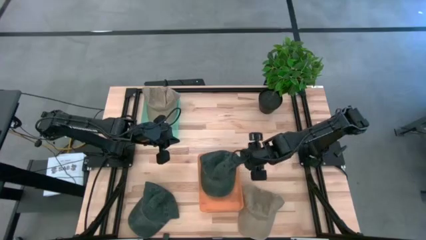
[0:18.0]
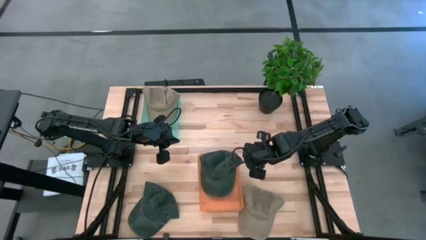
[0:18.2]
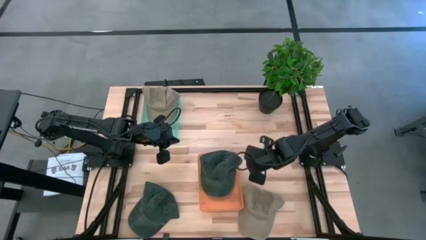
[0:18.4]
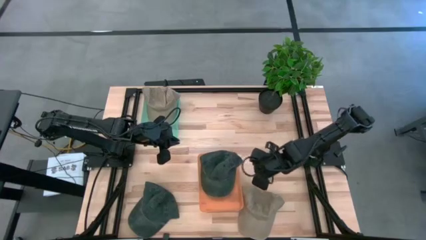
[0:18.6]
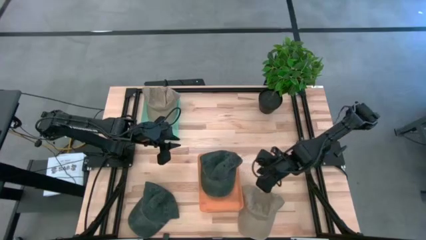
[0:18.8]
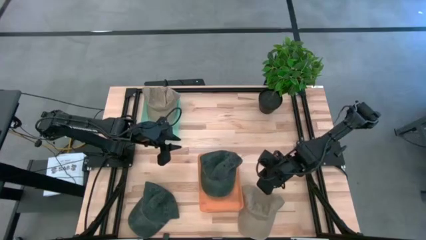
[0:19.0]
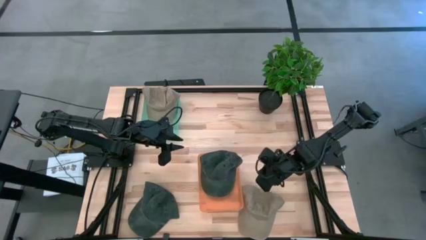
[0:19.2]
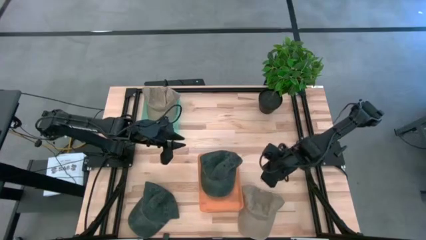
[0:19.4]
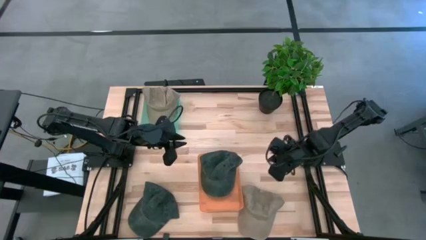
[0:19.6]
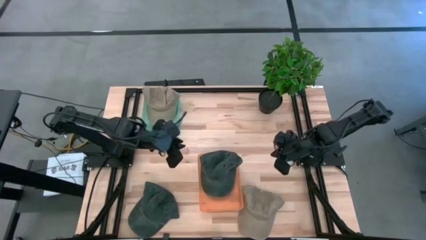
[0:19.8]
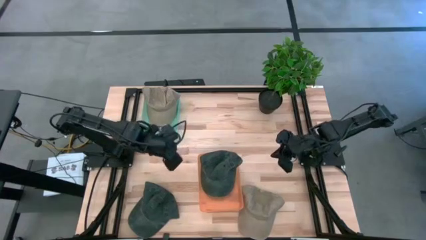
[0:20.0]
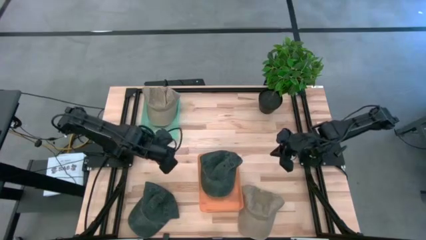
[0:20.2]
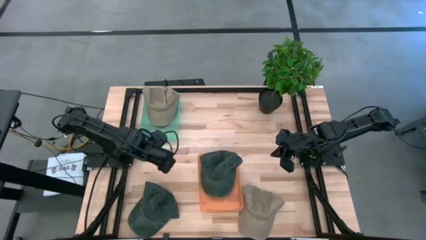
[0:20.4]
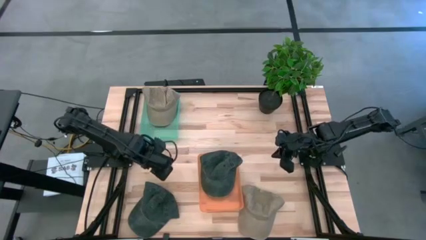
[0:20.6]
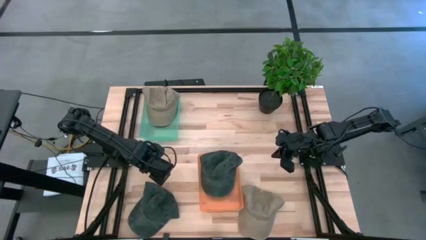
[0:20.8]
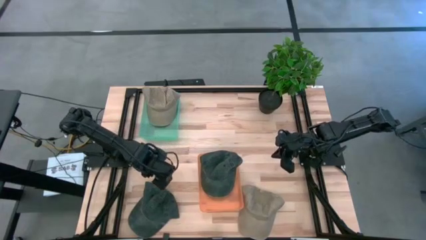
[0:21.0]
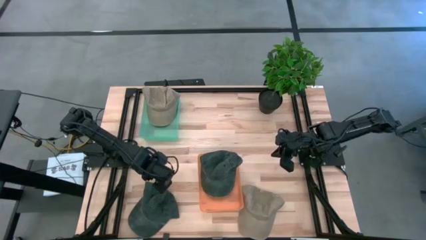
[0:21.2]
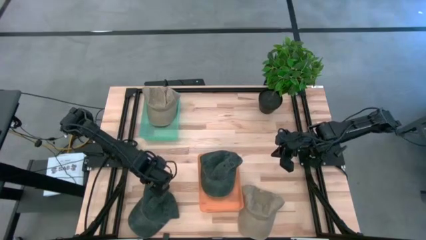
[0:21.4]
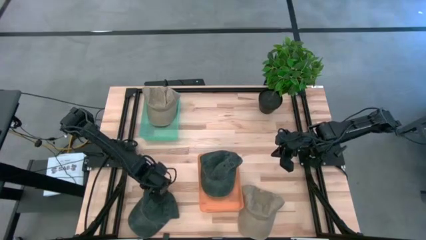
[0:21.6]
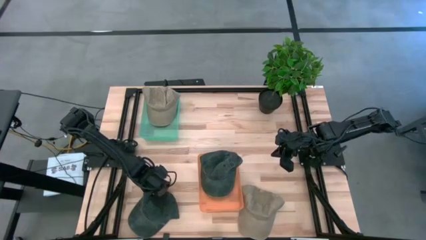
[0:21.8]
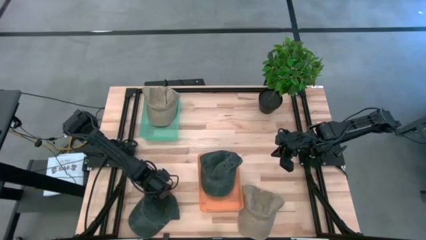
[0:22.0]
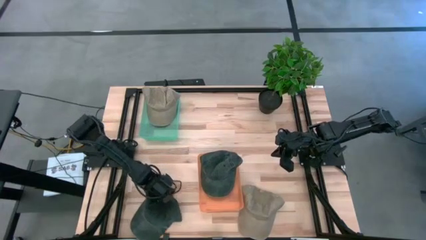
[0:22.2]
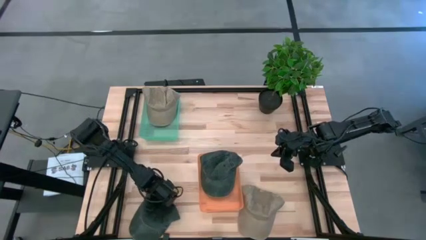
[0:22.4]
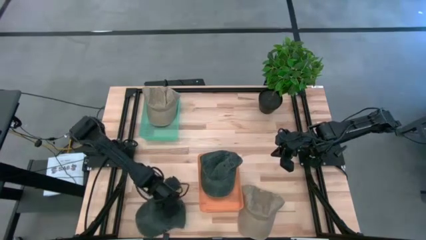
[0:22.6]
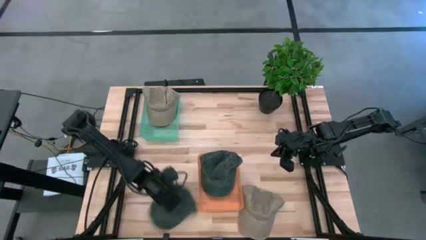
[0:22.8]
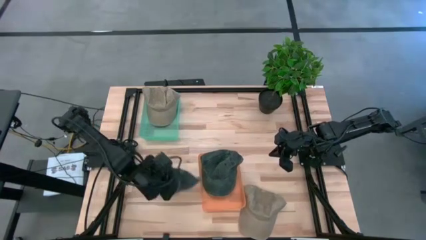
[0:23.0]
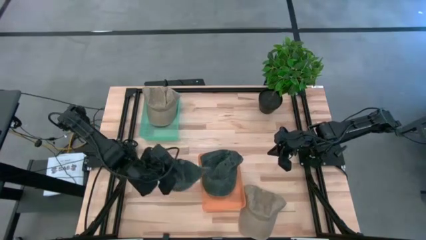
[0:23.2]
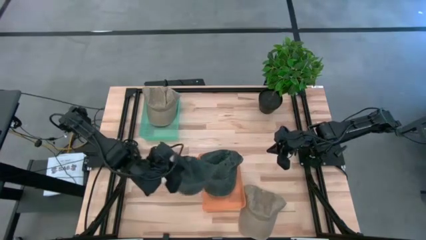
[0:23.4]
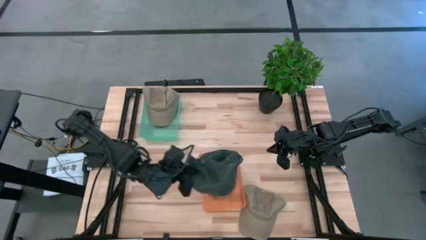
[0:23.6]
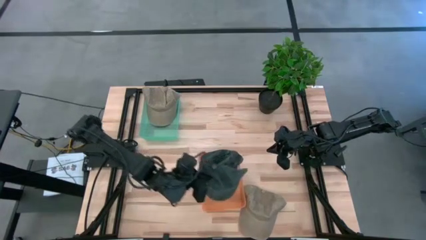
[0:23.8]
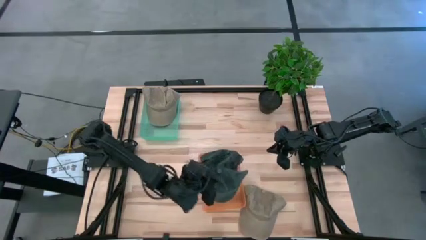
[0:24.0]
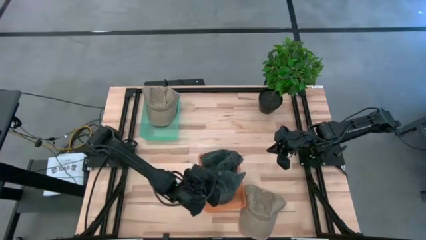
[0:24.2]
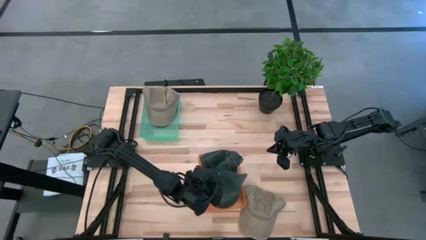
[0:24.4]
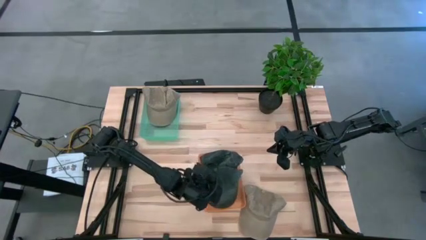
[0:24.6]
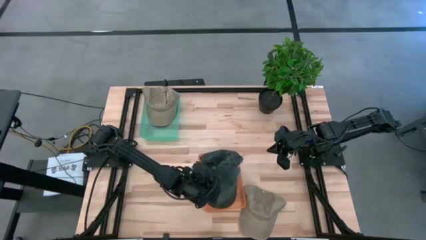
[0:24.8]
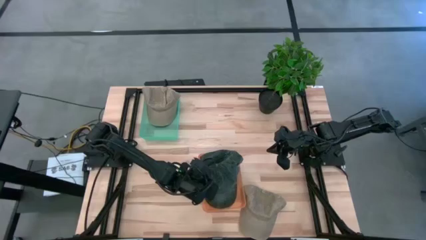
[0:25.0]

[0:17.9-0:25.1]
Task: Pick & Place hat
Put the green cap into the orange bin

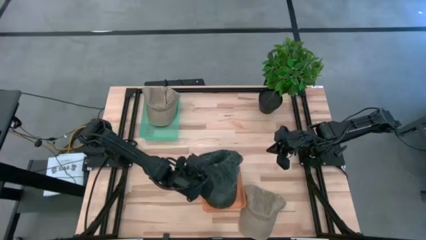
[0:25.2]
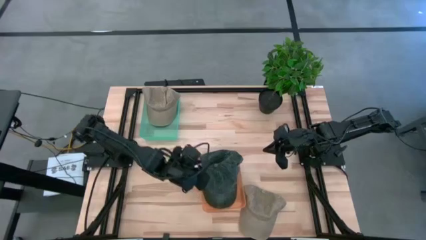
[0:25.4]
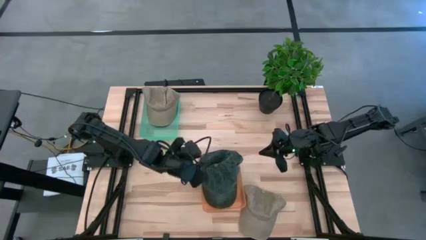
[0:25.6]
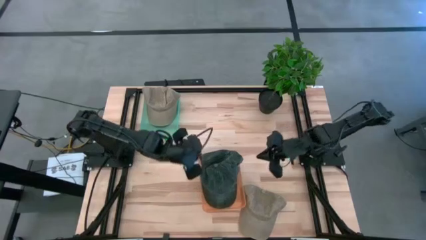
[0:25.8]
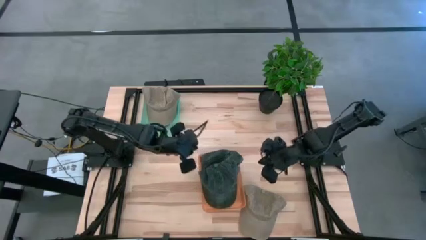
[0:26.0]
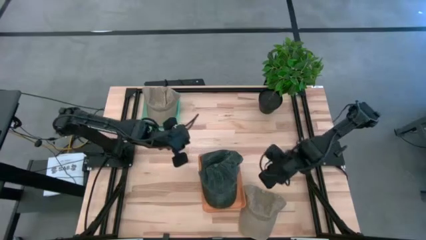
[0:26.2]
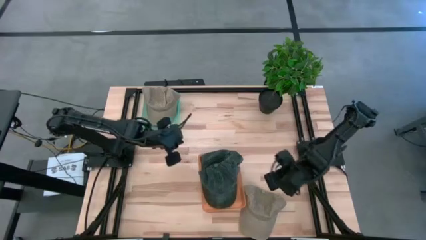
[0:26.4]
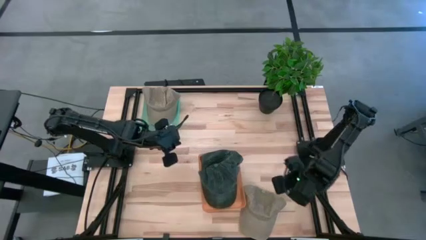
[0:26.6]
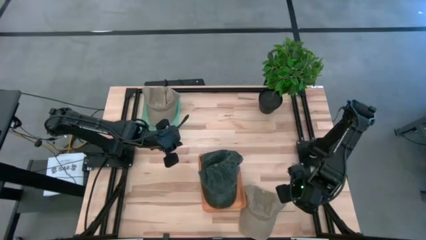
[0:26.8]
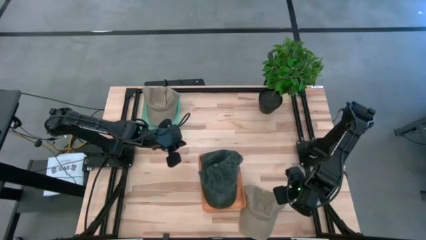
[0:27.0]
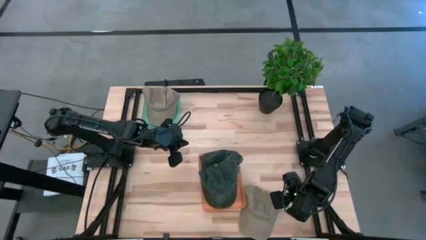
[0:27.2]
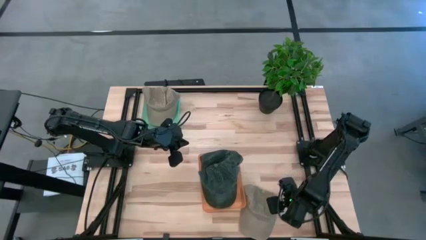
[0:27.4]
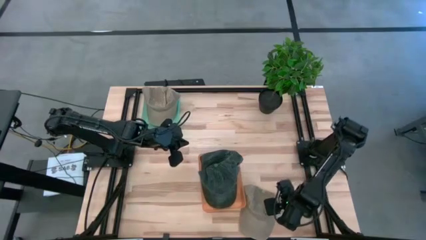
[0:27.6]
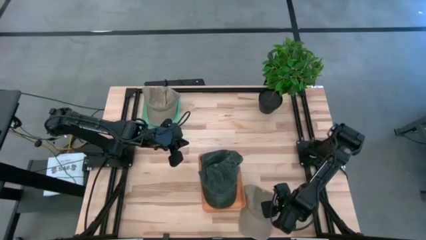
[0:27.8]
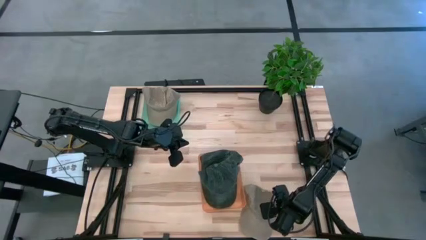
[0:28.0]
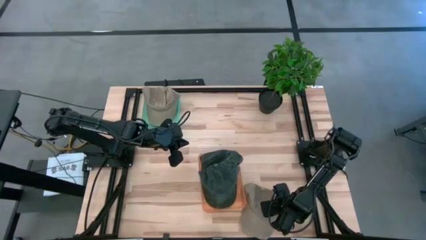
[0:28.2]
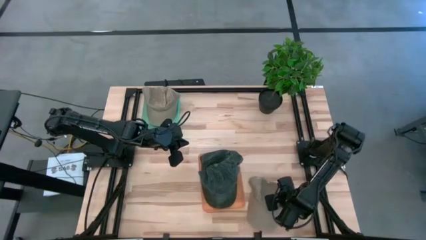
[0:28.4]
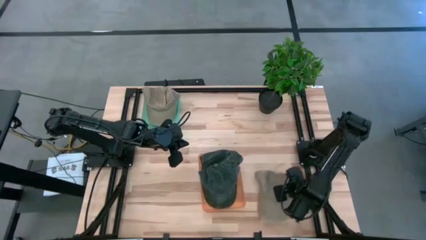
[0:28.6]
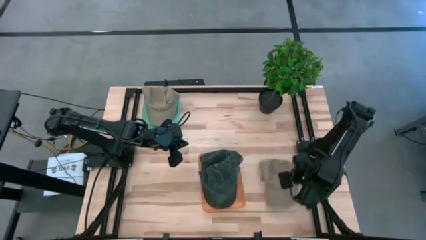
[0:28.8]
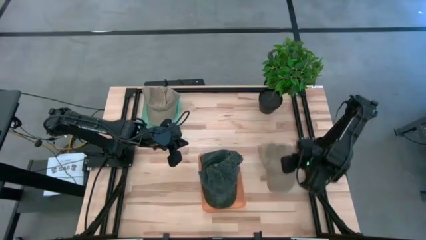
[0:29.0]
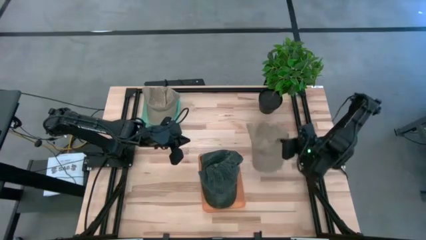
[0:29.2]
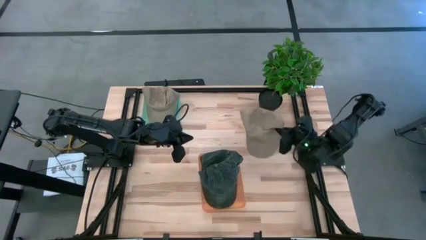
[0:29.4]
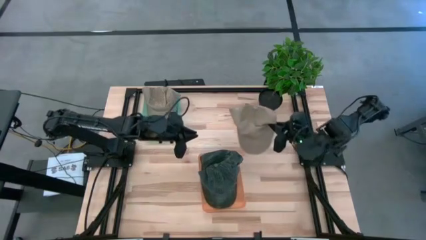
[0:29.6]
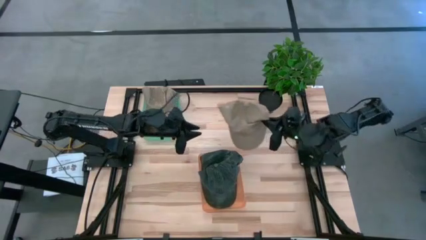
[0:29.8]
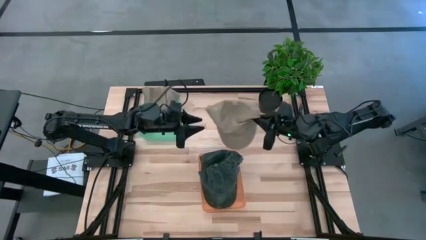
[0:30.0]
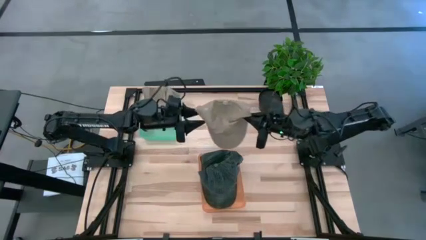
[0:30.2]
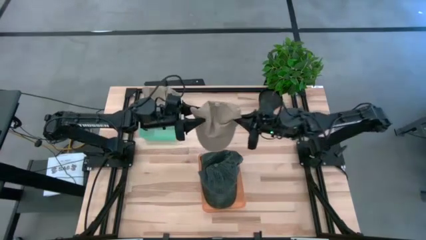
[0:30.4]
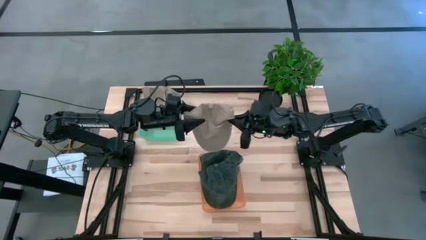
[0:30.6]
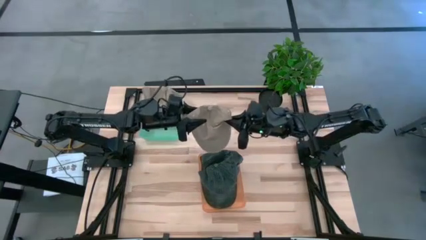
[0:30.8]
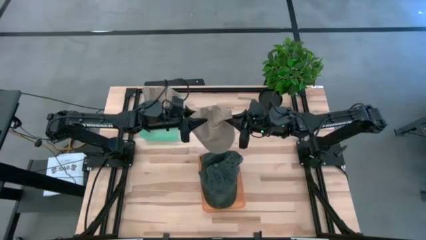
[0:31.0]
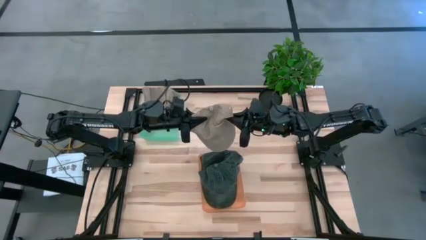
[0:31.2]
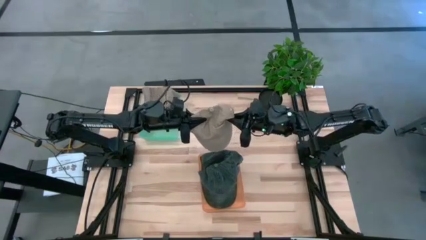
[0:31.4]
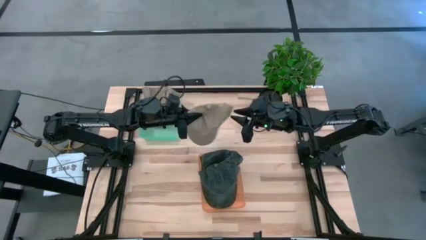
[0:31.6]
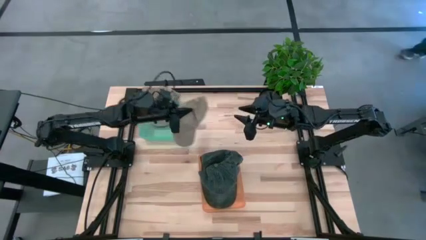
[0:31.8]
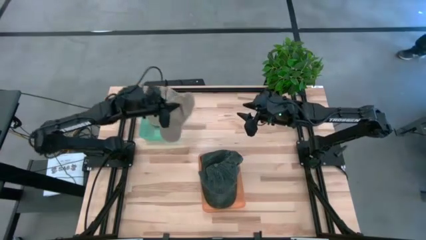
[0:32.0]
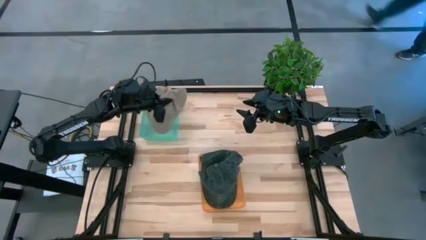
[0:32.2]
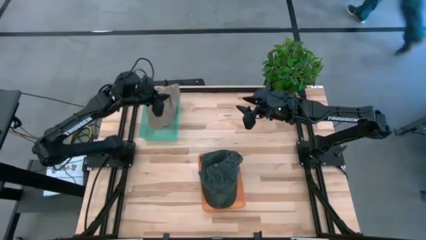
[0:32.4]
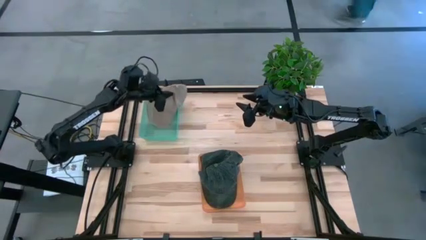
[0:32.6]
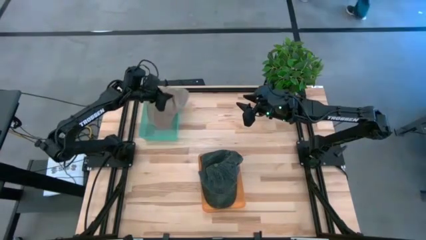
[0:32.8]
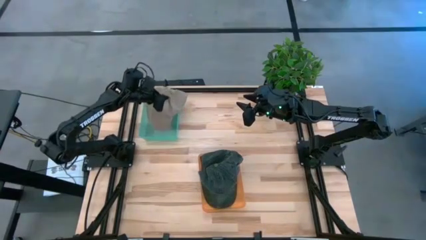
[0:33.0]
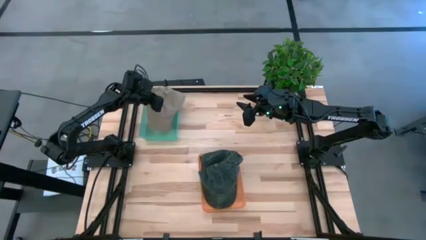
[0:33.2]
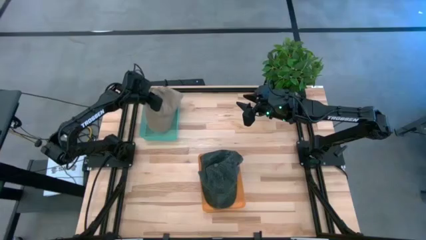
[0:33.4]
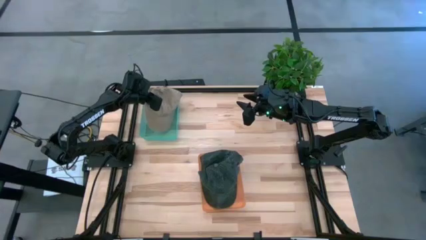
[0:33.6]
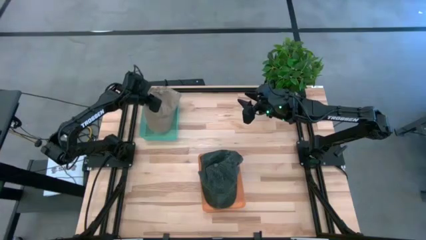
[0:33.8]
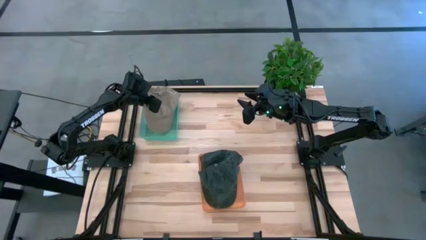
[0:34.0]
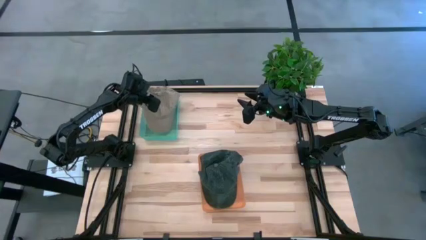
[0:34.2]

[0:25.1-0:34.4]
Put the brown cap into the green bin

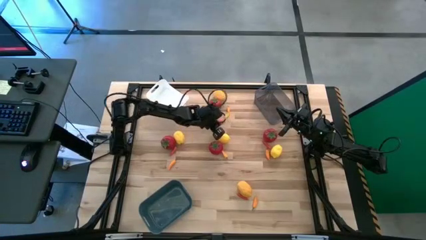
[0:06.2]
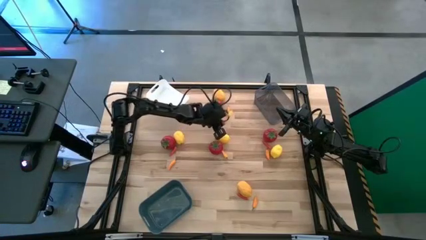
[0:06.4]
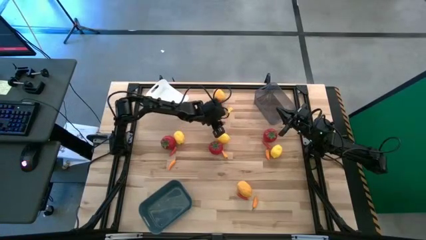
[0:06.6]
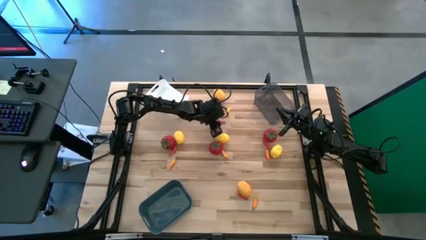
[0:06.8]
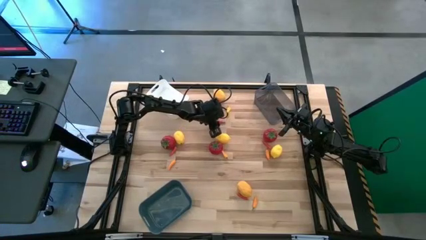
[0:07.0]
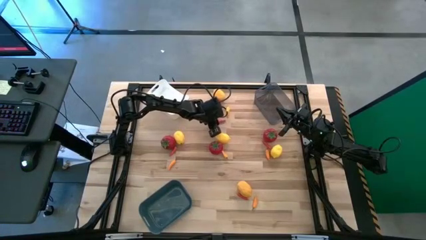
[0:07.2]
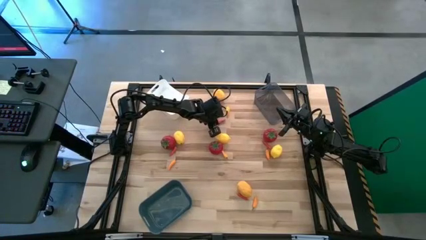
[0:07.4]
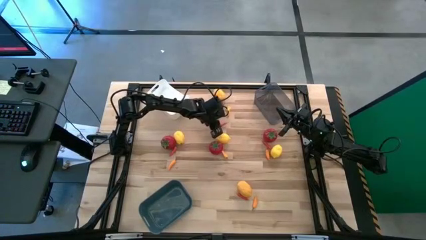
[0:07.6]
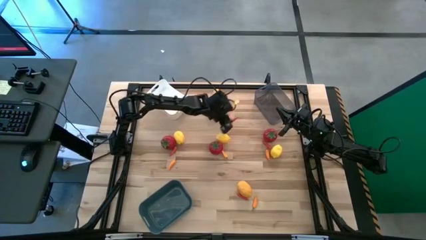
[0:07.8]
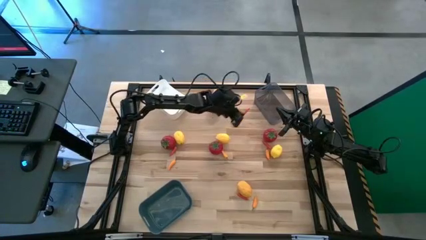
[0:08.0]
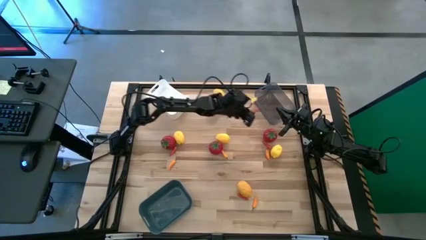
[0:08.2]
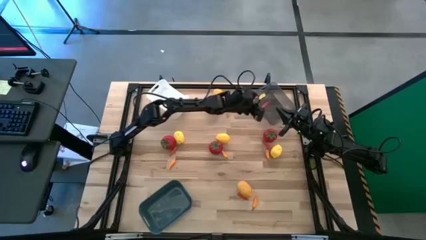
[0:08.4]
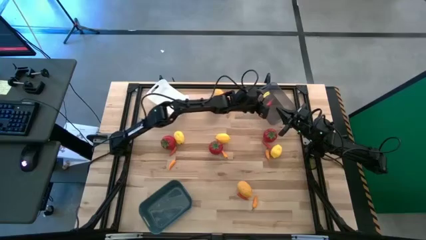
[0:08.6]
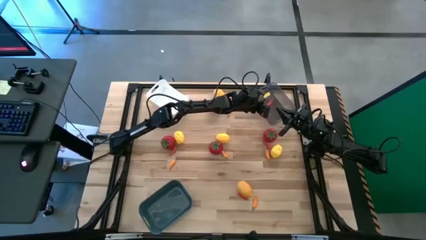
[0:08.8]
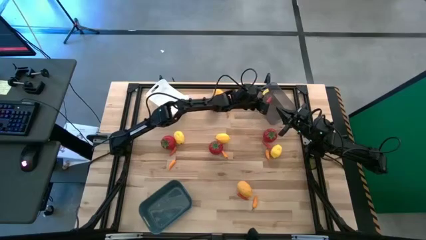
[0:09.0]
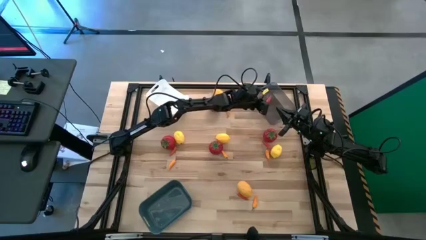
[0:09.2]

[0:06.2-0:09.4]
Task: Sort produce into baskets
Put the red chili pepper into the black transparent bin
